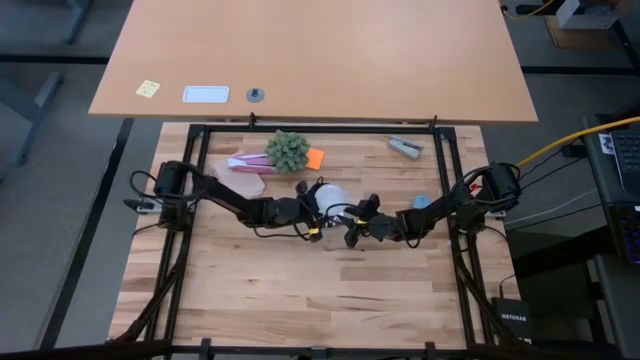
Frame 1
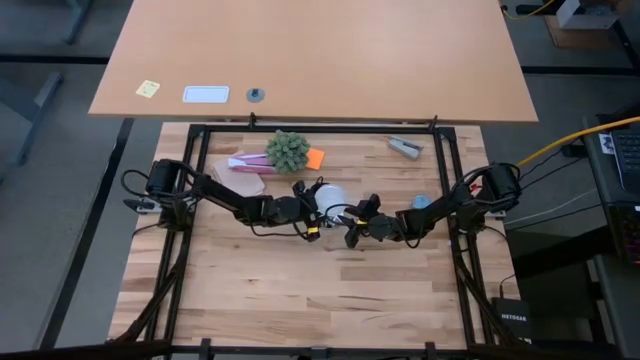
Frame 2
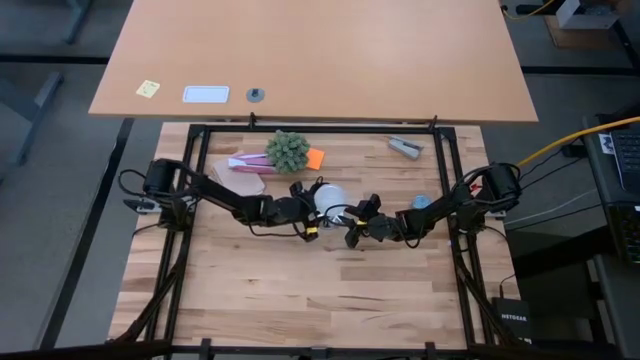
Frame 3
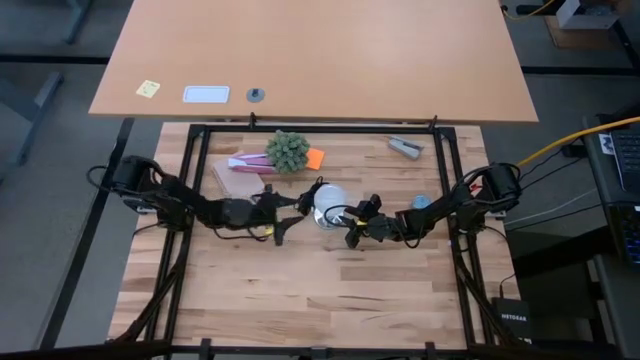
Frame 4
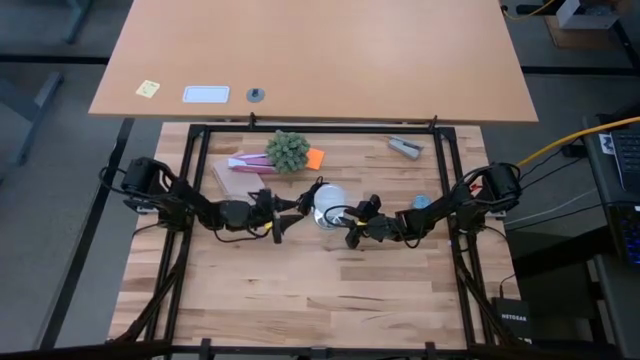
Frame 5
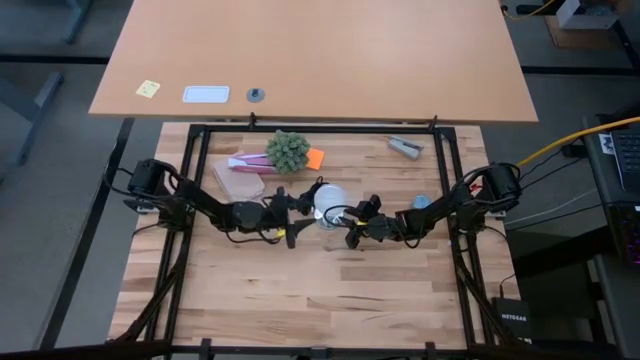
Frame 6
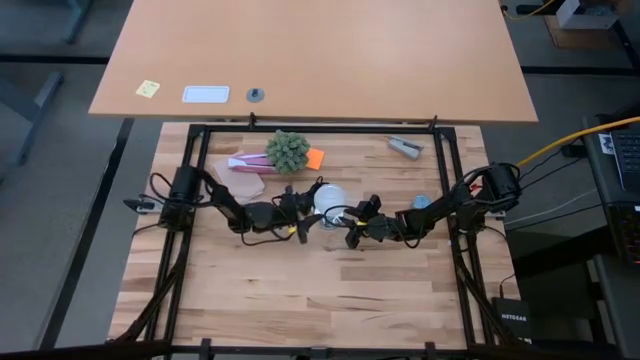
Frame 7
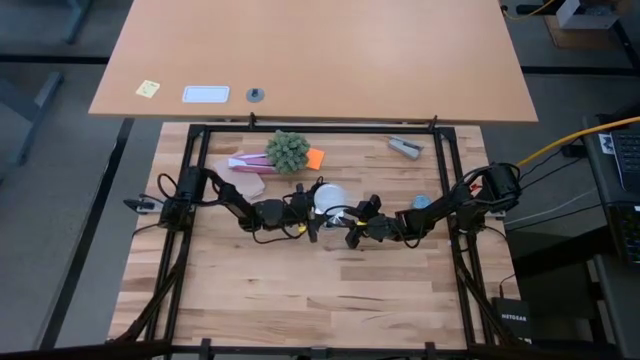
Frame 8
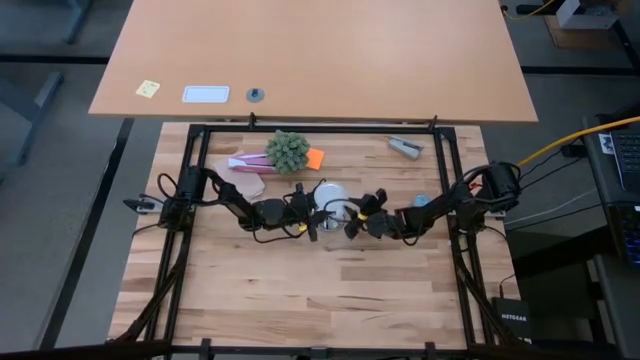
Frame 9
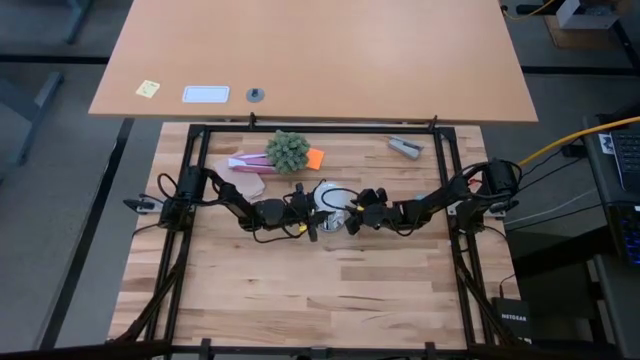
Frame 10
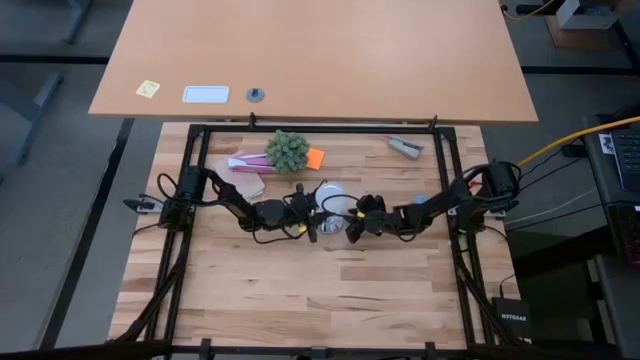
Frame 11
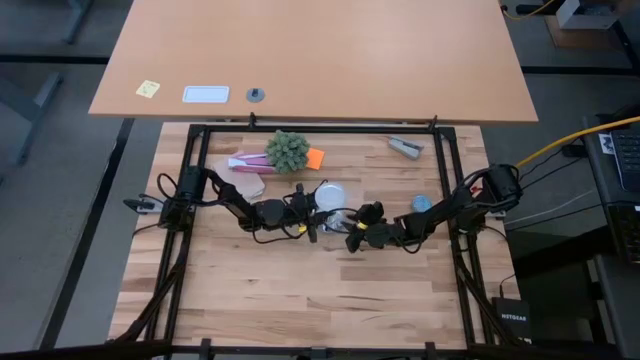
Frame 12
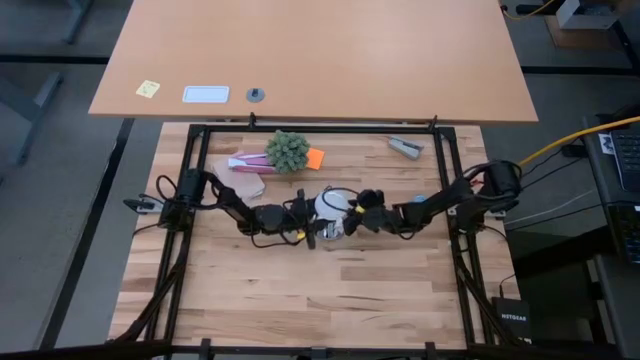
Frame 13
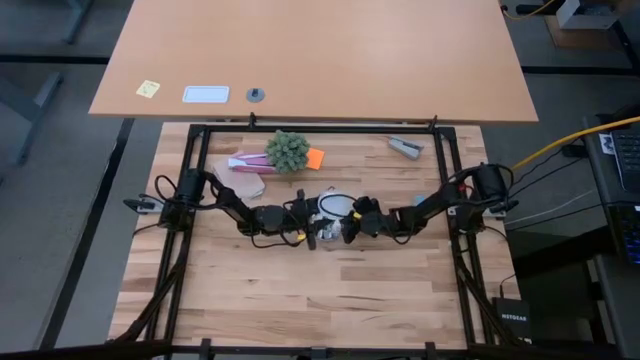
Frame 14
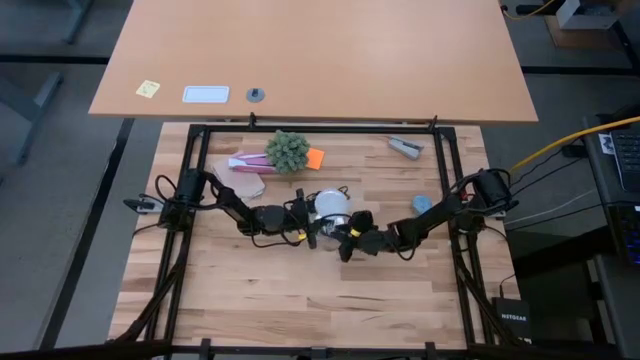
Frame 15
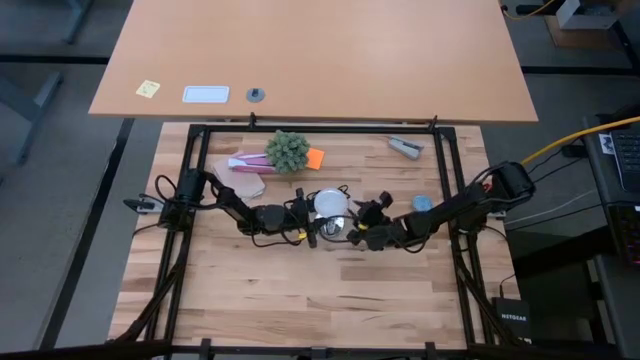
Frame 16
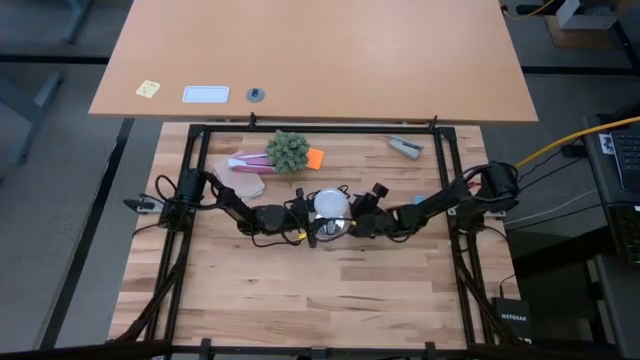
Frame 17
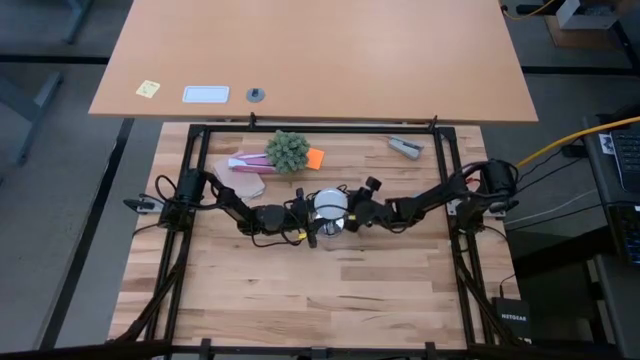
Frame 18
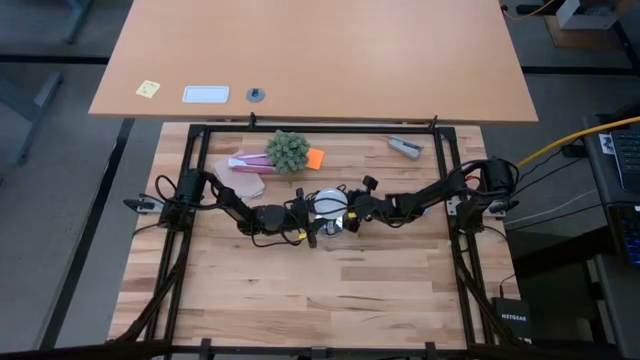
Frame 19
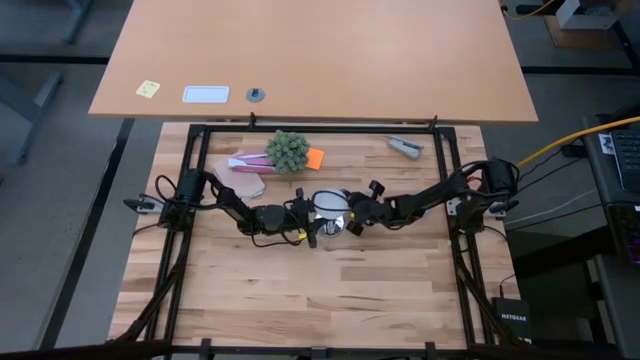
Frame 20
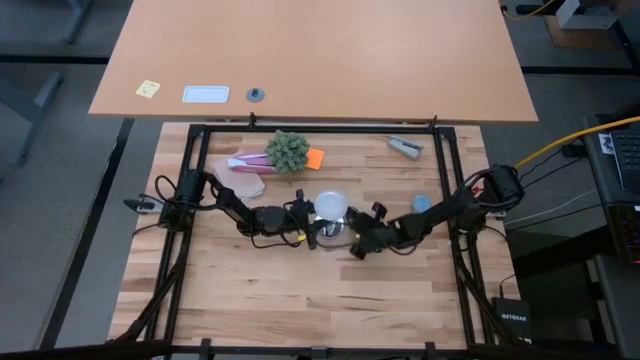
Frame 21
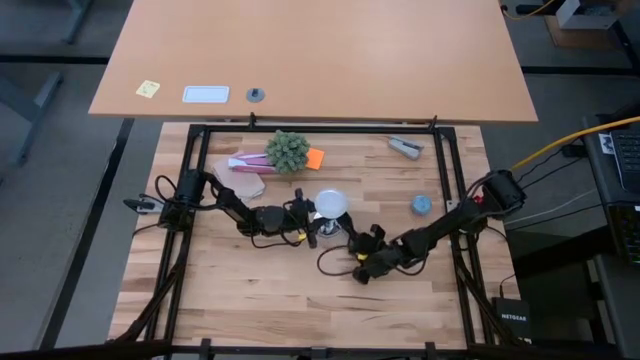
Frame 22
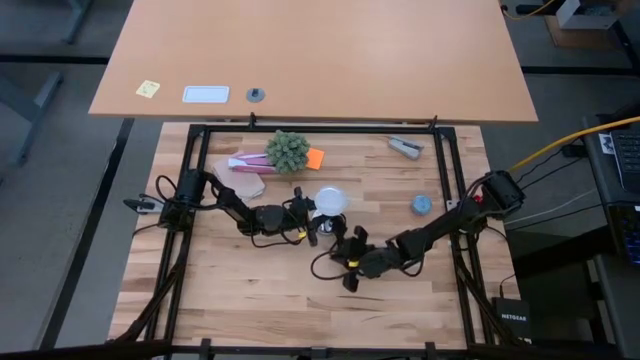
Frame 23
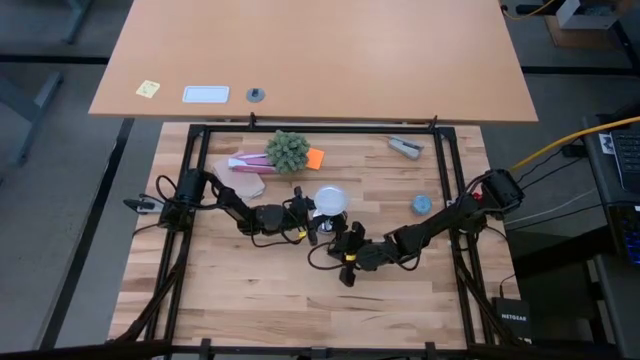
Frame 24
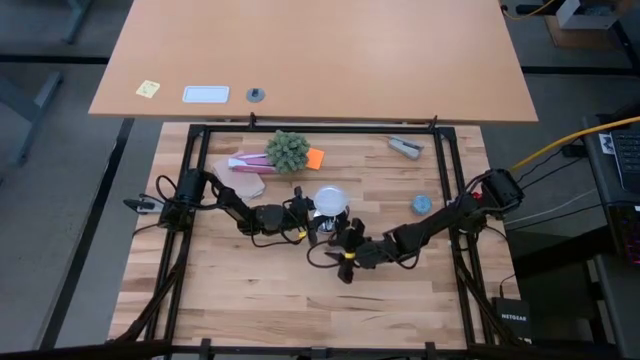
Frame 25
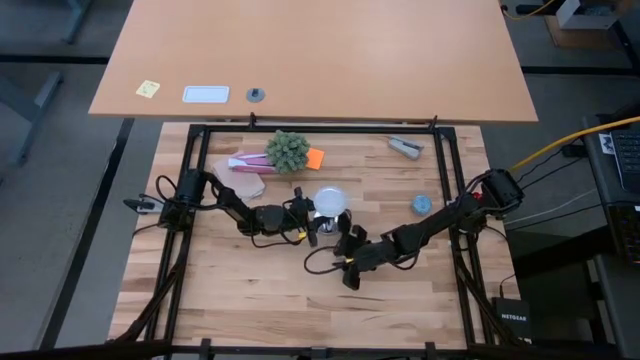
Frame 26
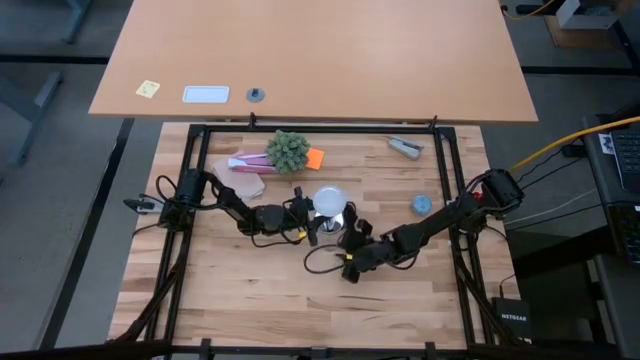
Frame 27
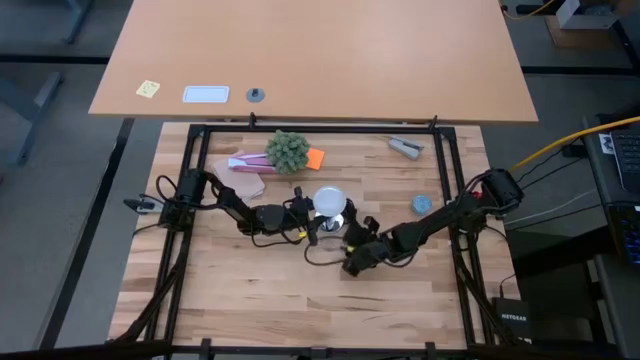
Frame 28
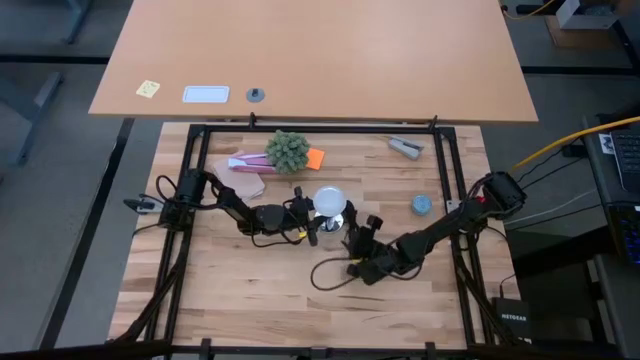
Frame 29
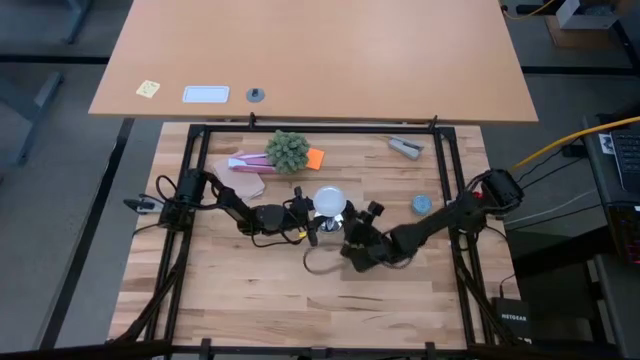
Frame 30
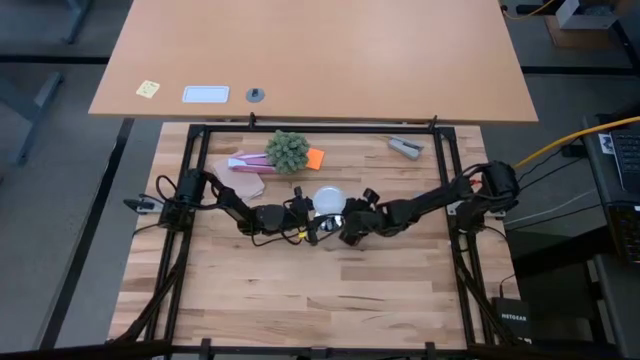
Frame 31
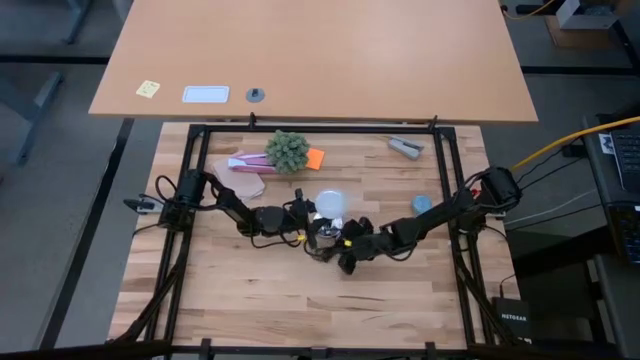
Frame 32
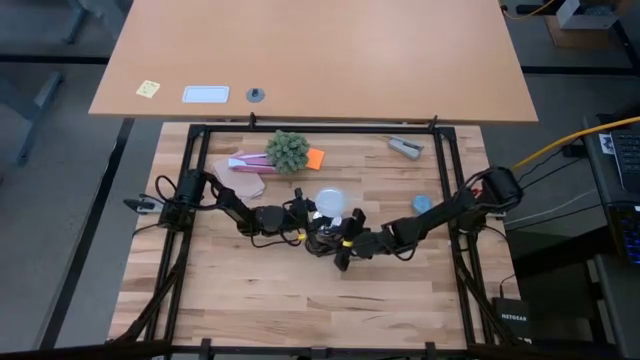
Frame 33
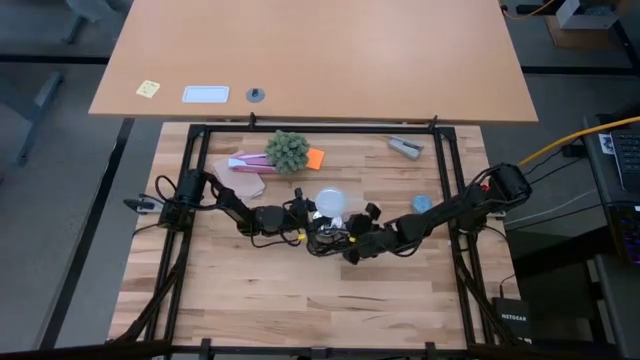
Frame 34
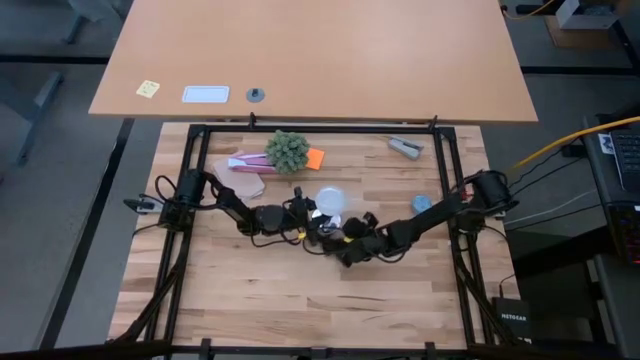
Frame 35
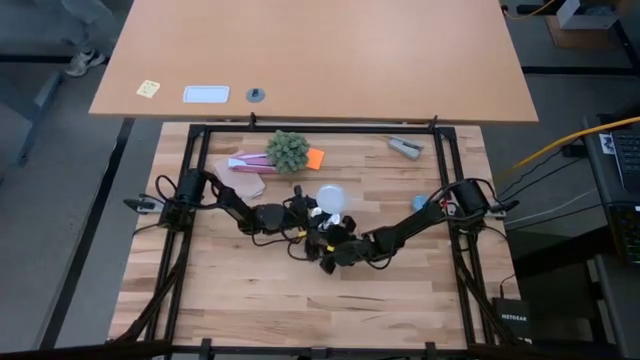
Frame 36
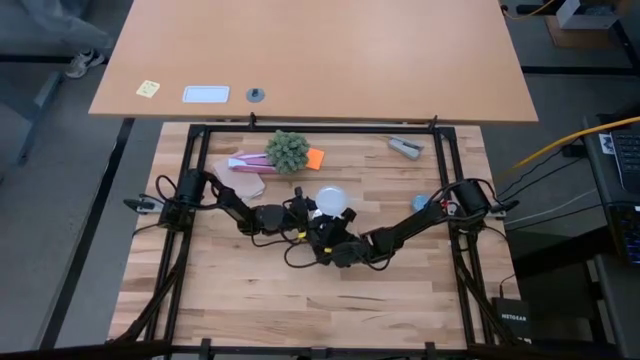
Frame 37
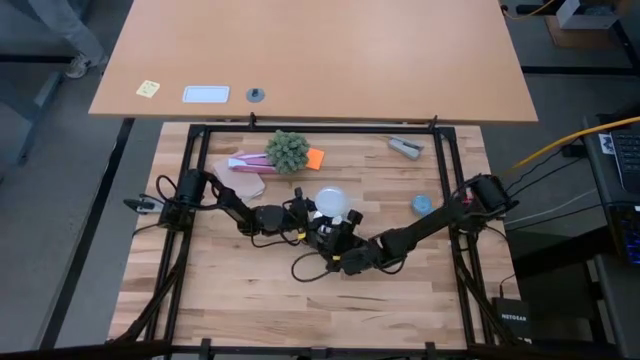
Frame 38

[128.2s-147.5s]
Task: Screw lightbulb
Remove the lightbulb from the lamp
